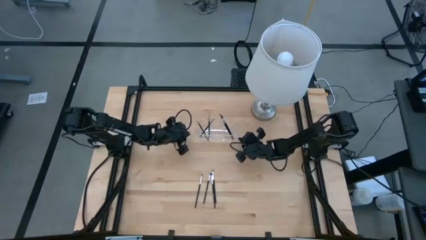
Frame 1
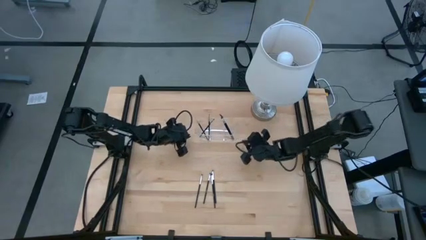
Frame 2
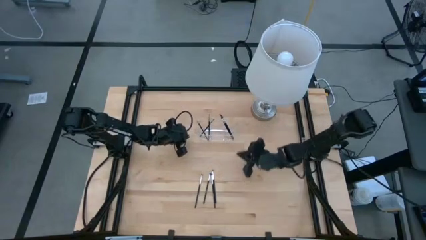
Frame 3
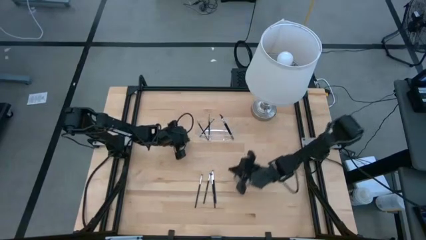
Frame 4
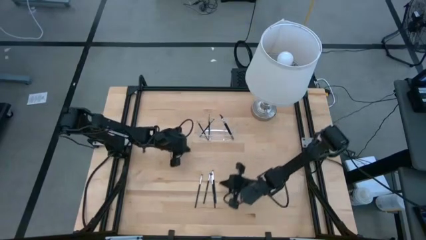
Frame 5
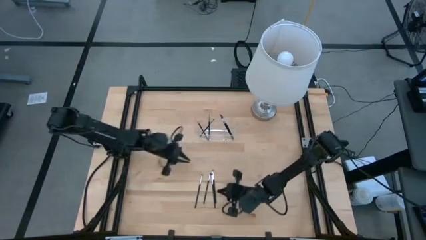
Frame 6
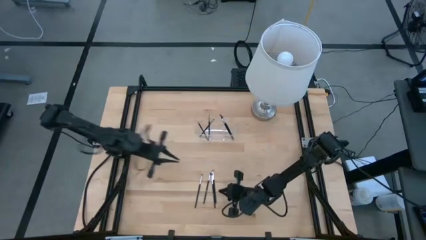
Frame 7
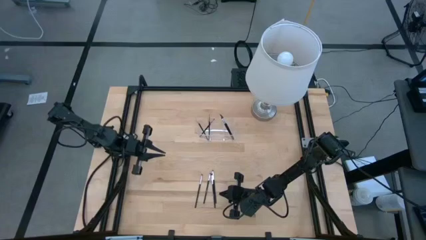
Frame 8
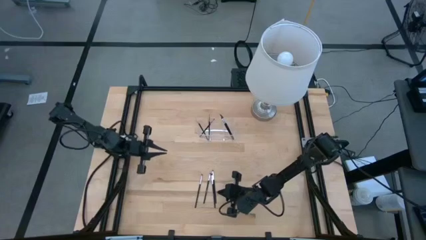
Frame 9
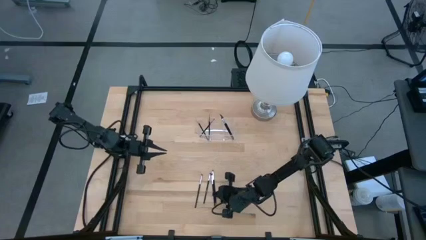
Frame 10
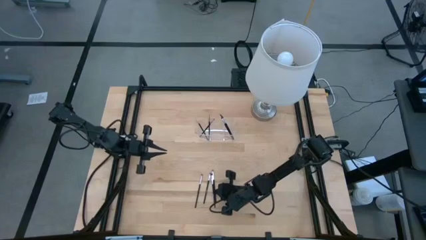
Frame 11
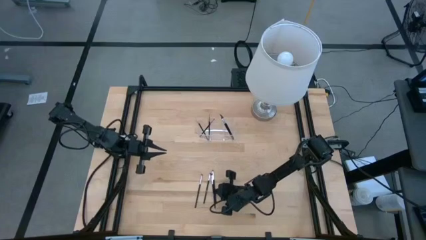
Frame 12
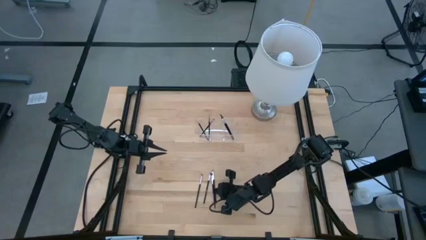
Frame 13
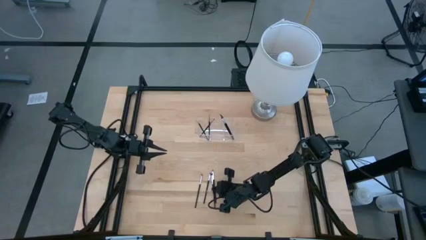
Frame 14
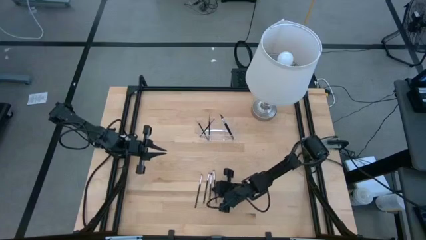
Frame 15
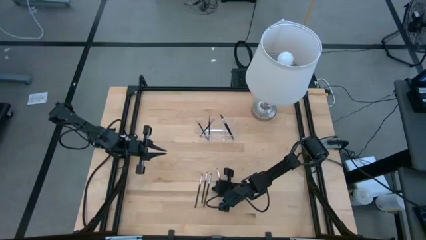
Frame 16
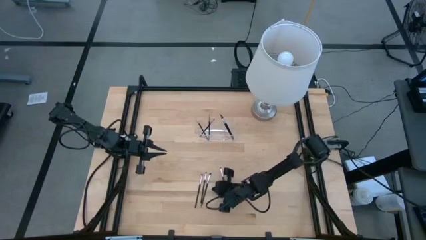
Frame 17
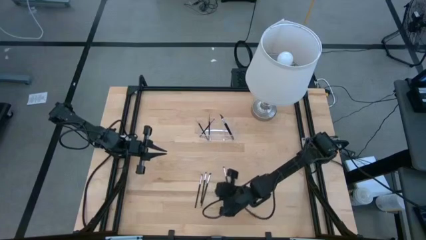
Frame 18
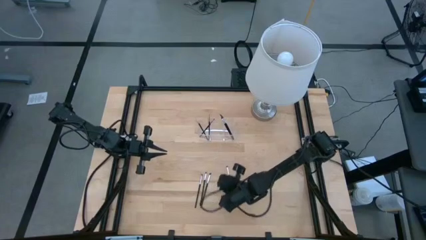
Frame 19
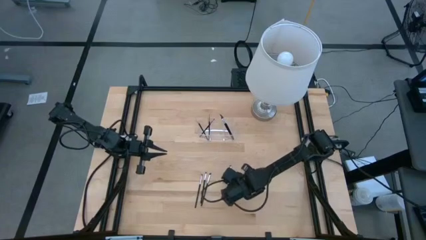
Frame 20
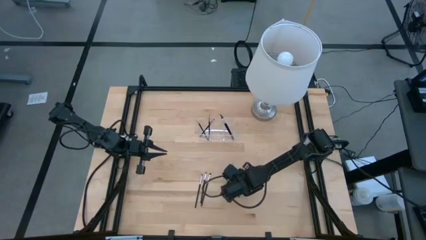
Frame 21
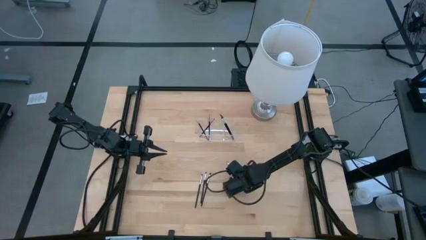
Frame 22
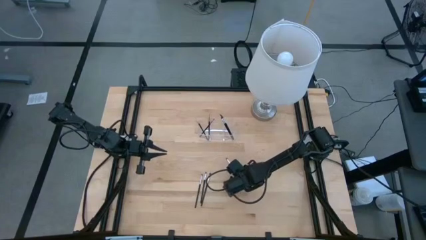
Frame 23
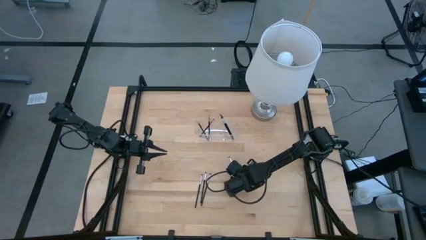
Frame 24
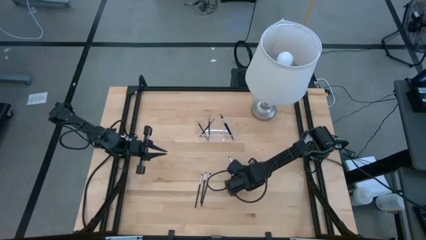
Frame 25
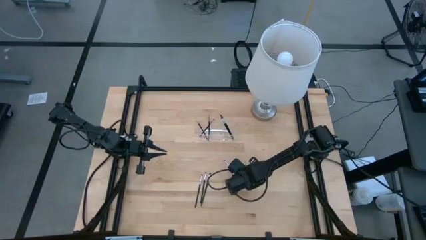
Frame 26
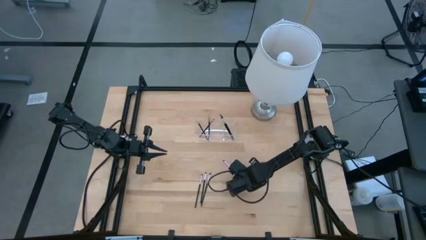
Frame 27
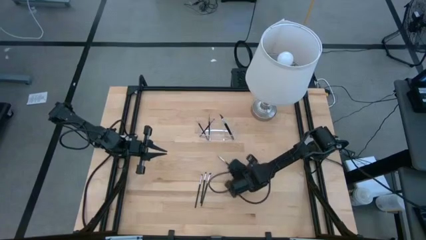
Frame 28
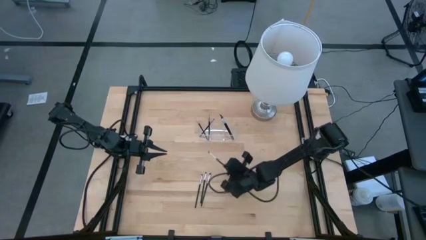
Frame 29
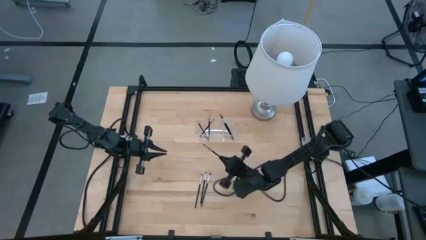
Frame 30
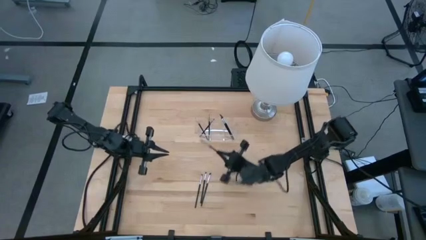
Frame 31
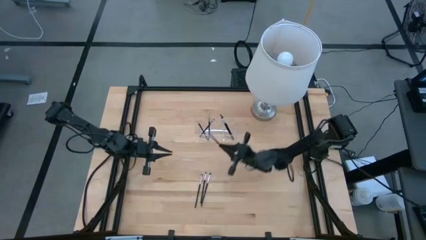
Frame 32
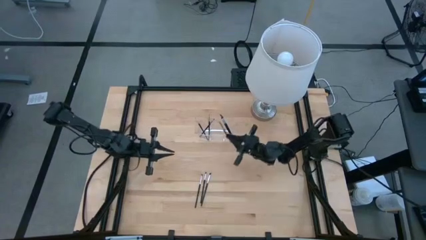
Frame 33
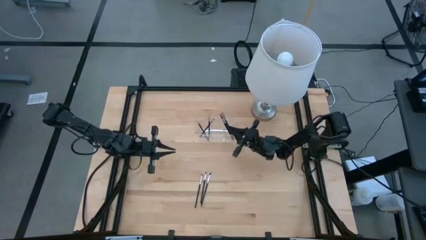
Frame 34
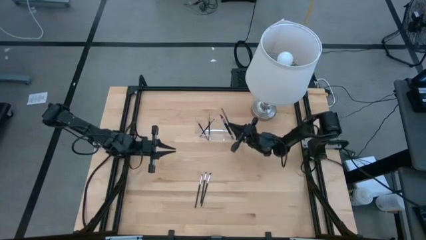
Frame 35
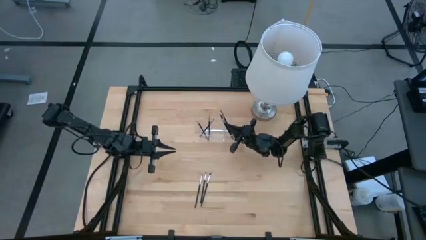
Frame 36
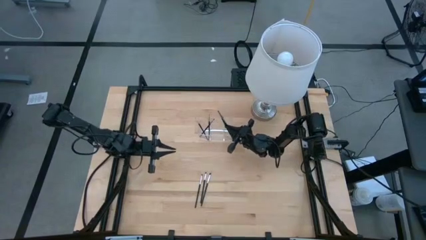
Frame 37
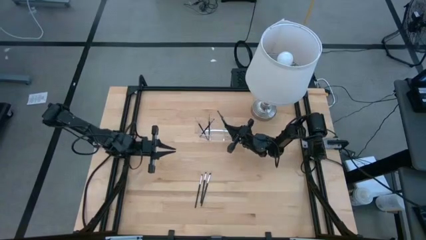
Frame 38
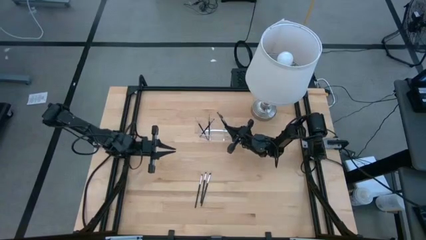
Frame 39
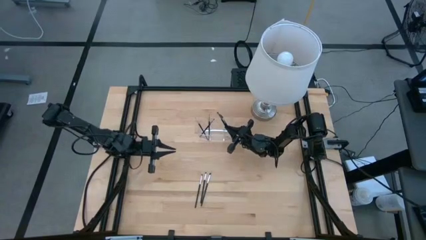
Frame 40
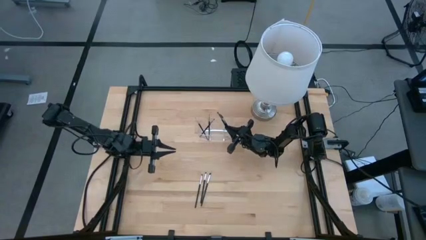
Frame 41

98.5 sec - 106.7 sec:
Task: Put items in baskets/containers
Put the black liner brush transparent organizer

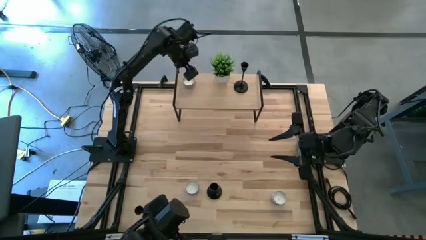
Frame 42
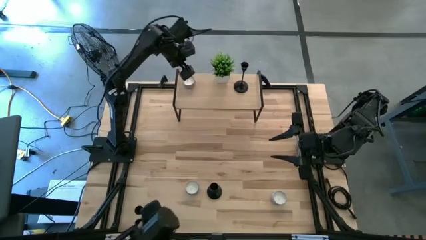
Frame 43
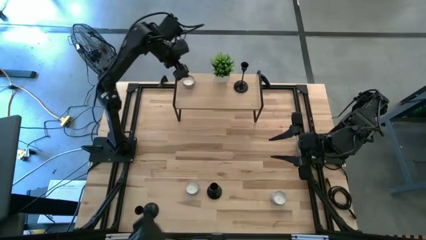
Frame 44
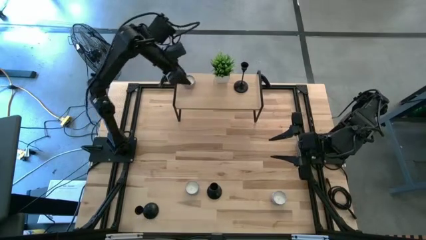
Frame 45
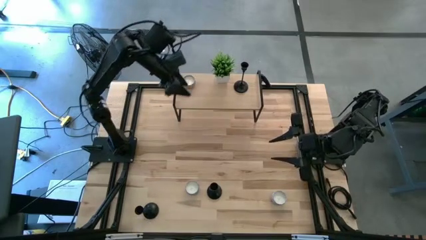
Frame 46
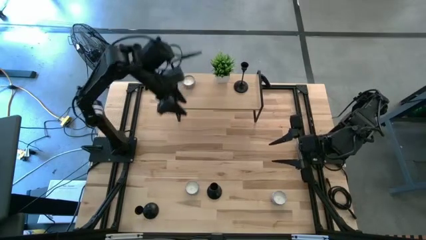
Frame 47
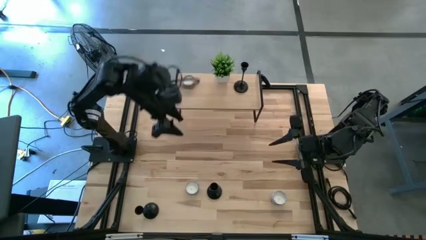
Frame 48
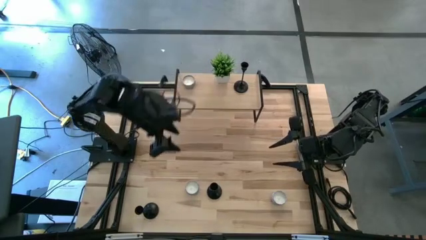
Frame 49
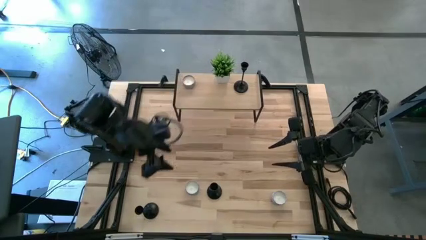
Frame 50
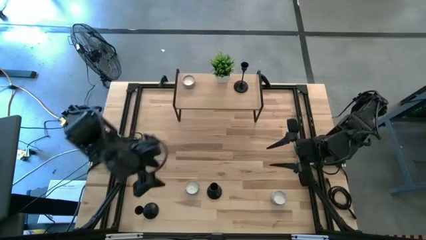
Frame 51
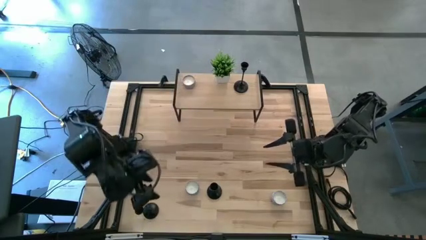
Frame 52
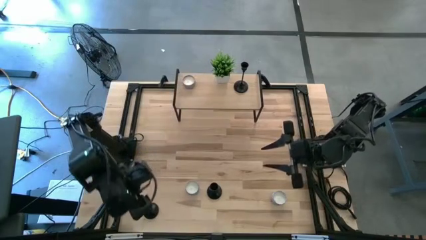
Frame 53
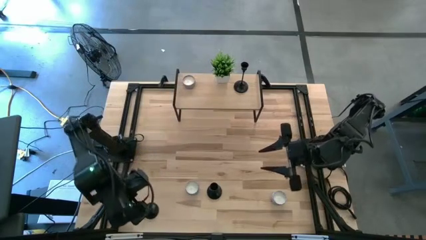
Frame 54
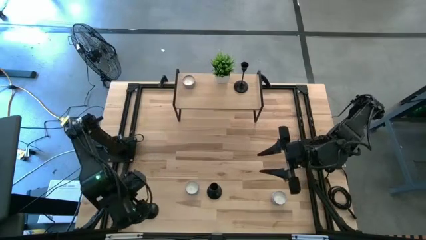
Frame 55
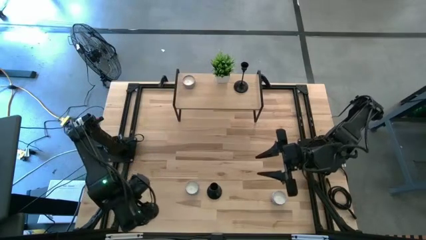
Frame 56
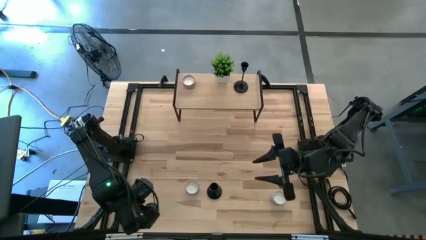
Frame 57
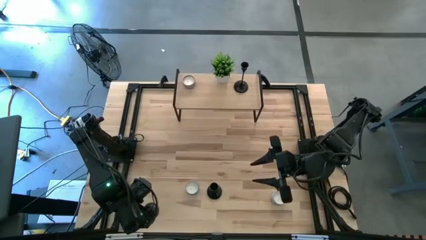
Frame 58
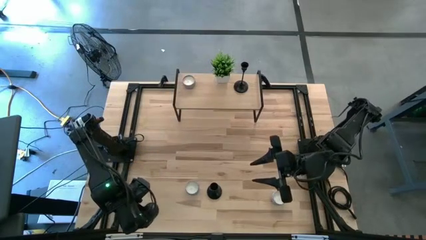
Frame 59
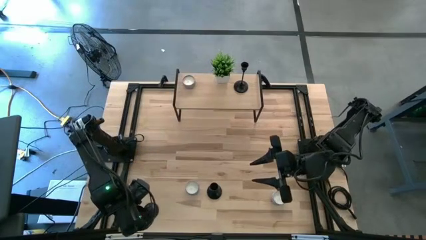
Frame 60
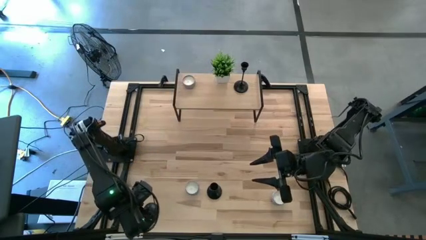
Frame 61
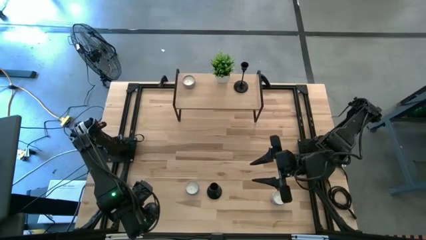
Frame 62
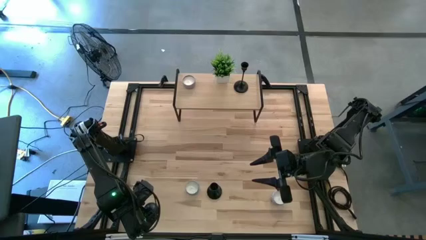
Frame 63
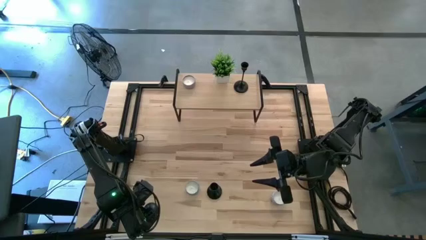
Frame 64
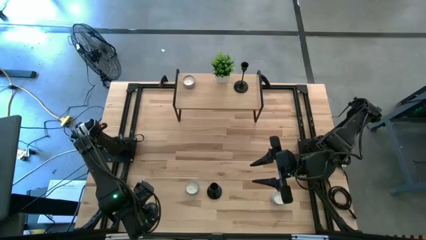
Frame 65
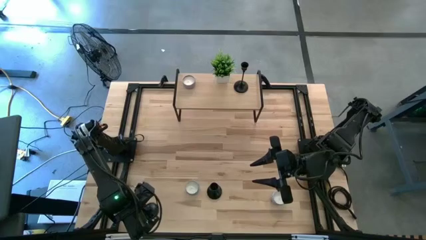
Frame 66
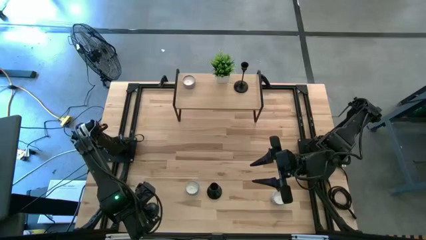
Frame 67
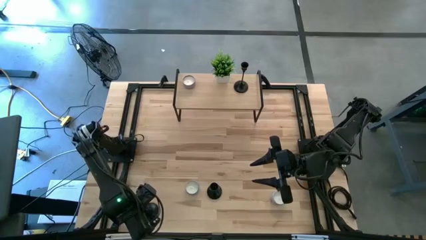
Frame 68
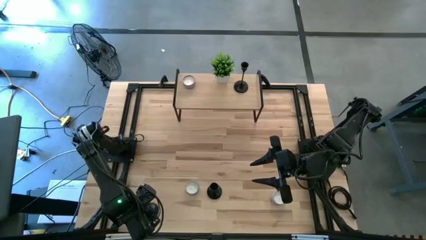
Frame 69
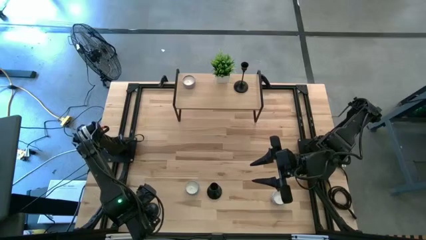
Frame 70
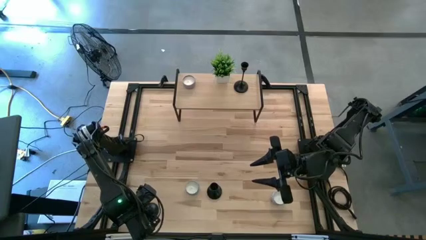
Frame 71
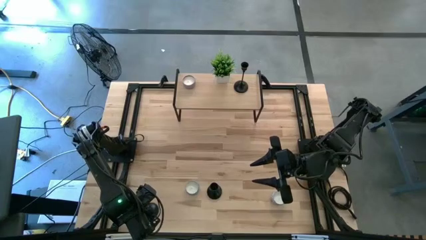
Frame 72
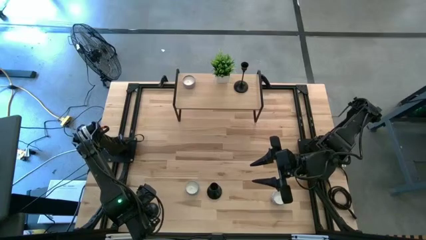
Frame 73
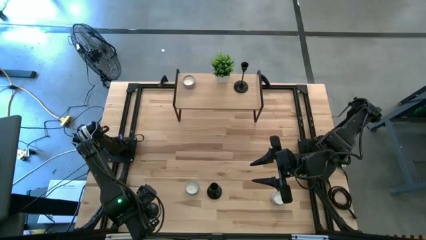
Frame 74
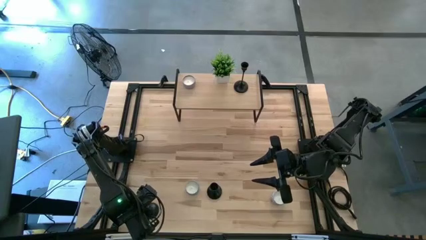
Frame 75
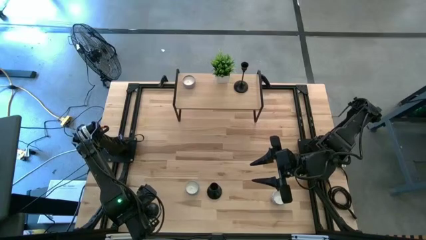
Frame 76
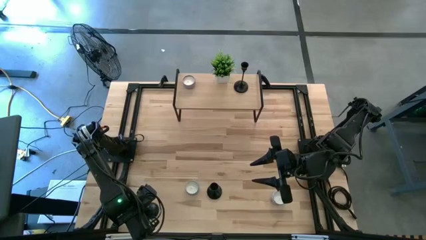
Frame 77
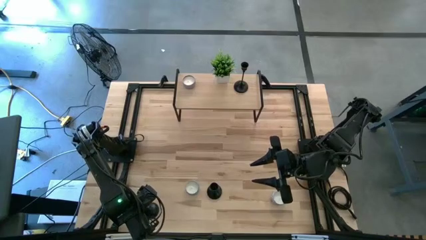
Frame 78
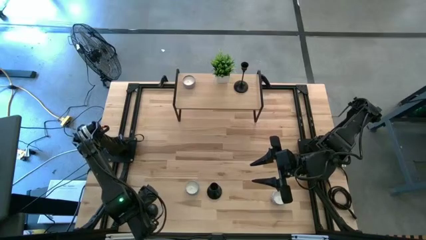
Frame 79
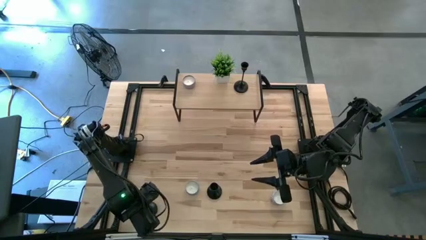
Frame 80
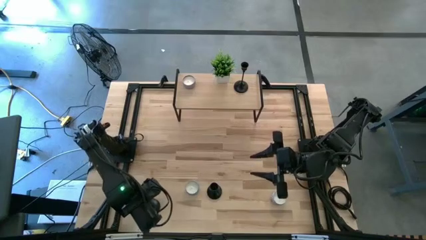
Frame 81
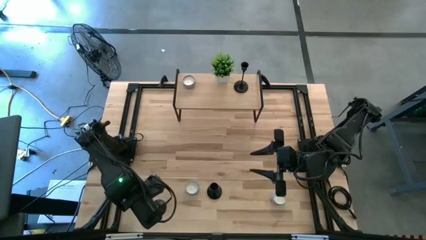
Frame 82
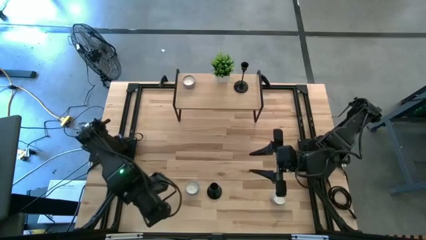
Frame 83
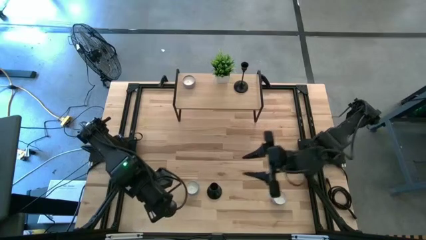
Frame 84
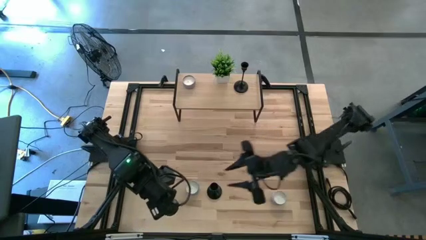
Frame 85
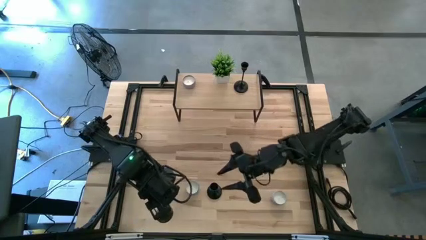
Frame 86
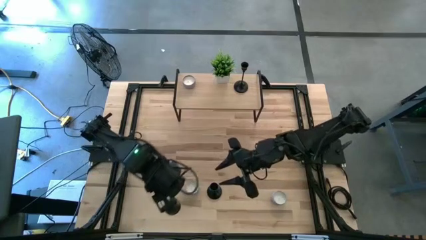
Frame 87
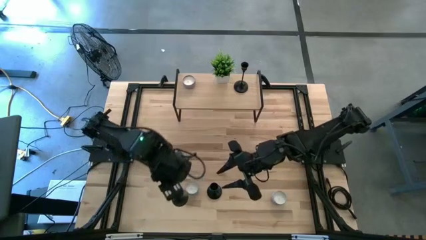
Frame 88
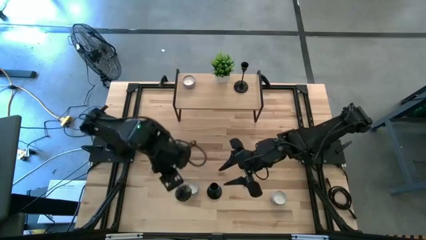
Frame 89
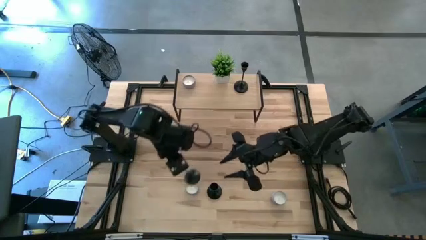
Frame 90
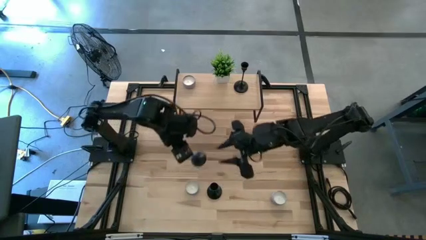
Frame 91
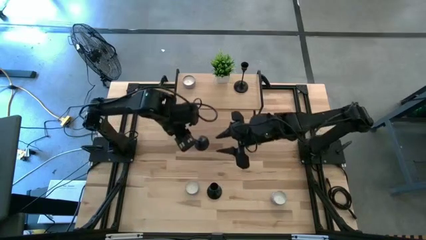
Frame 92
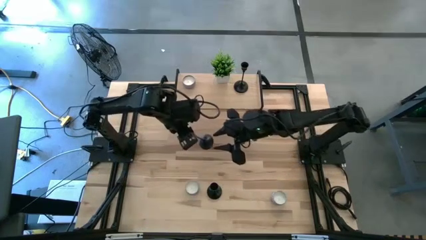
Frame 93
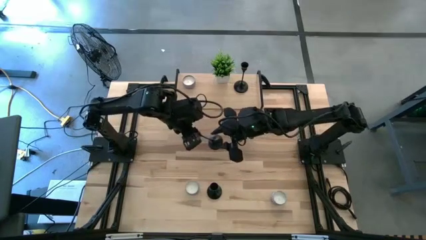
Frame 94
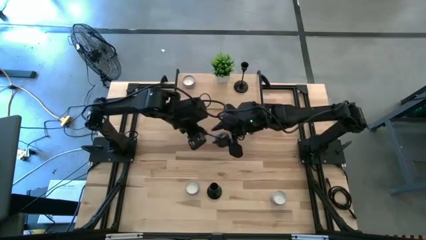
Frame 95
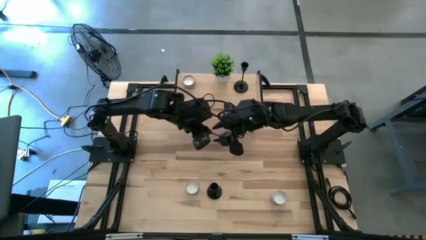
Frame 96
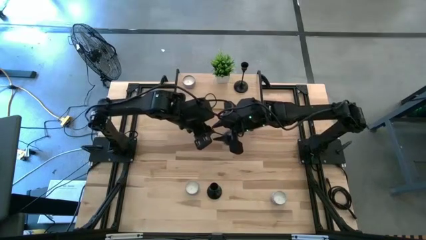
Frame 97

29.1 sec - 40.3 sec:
Task: Pick & Place candle stick holders
Put the left black candle holder on the shelf
